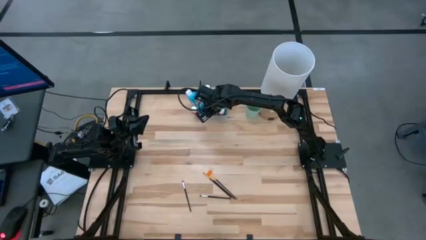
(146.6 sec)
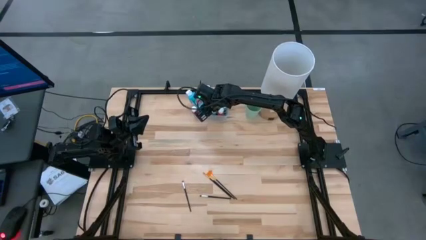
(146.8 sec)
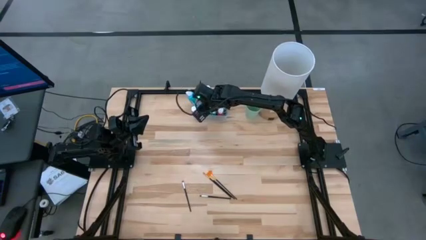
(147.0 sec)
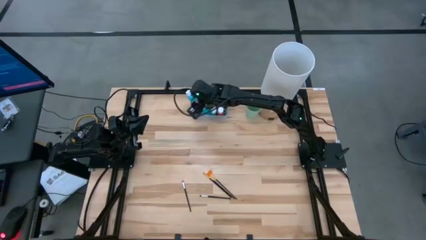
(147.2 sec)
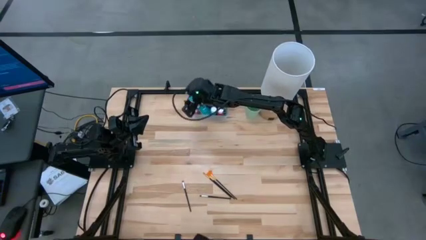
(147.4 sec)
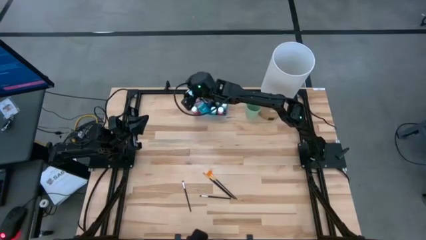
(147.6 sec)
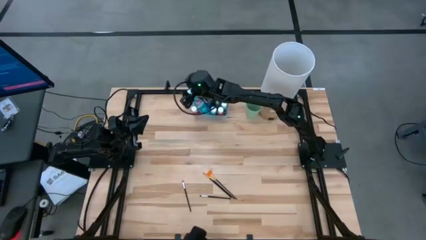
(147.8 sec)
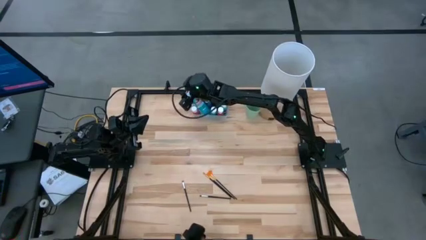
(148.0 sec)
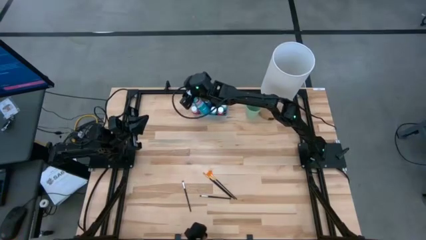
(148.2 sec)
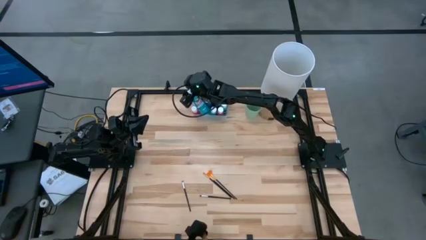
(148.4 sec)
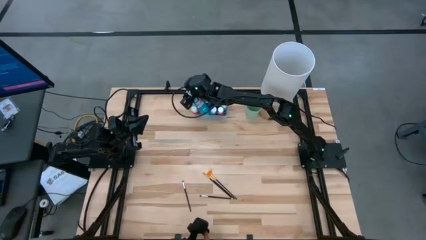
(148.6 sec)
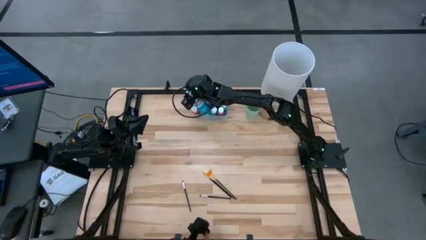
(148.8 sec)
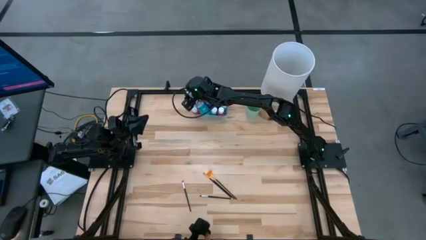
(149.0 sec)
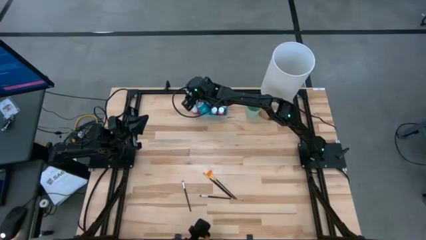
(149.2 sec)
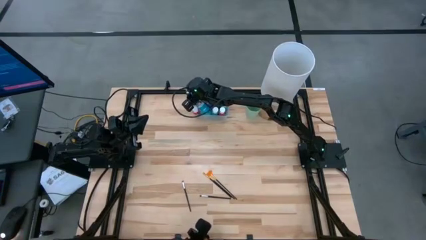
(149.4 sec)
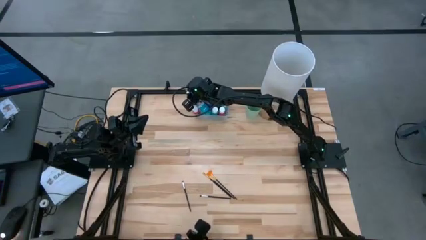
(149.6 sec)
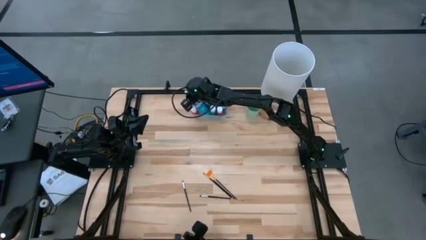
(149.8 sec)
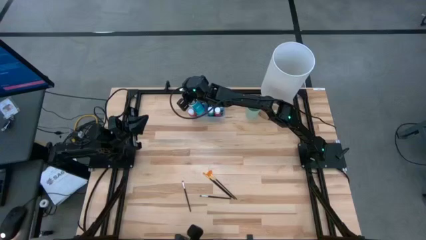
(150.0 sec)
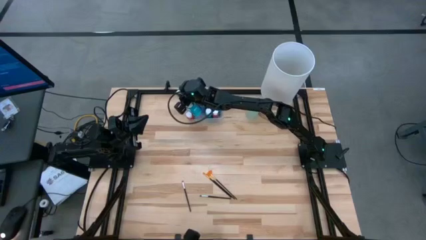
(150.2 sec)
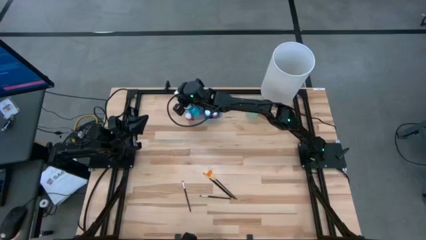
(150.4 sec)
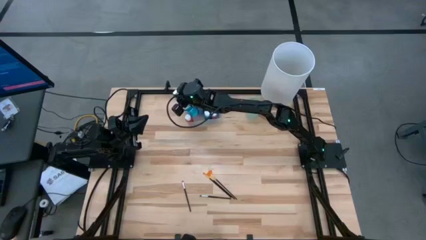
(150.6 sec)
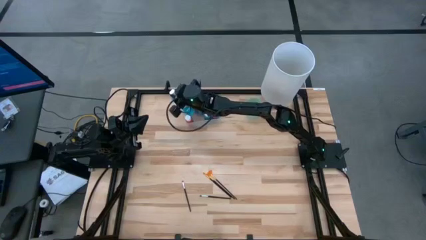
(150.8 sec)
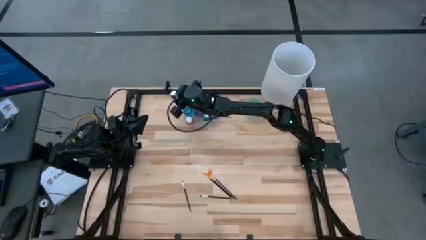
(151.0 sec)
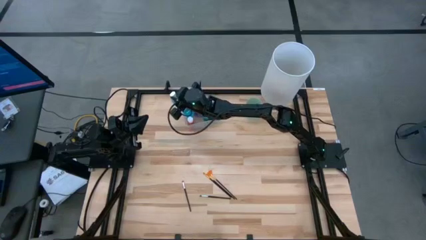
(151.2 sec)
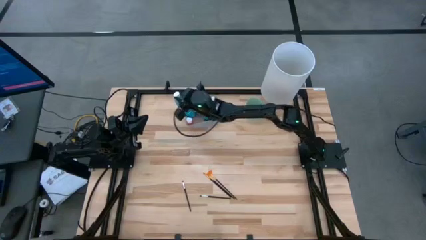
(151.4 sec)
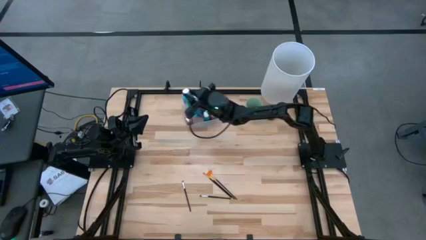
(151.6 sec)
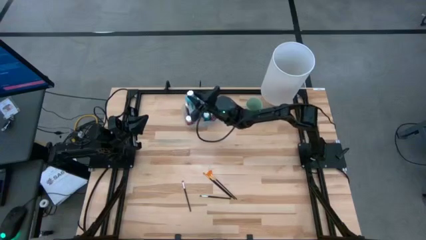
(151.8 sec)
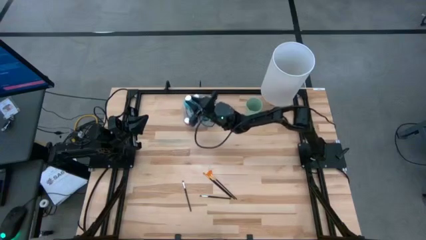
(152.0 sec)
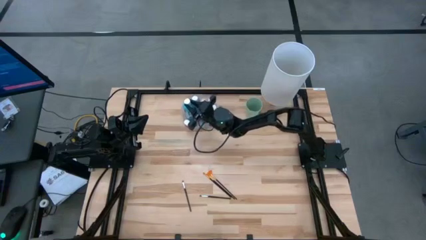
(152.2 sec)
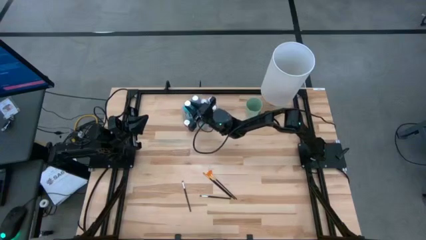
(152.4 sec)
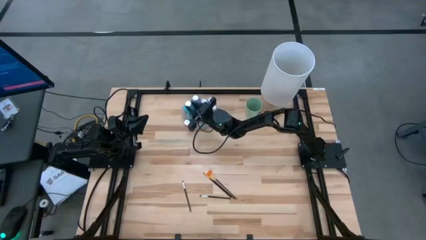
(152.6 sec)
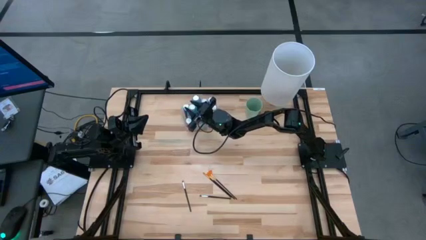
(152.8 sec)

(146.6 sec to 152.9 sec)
Task: Pick & Place Paint Supplies
Adjust the large light blue paint bottle inside the transparent bin

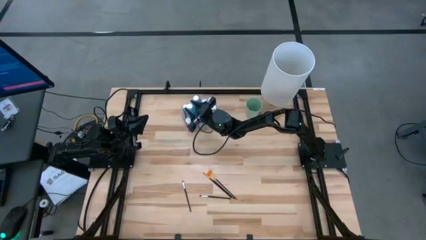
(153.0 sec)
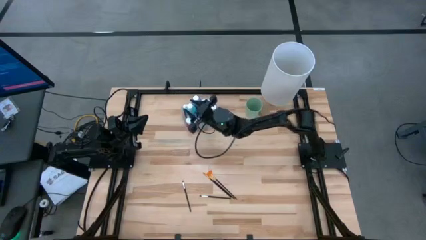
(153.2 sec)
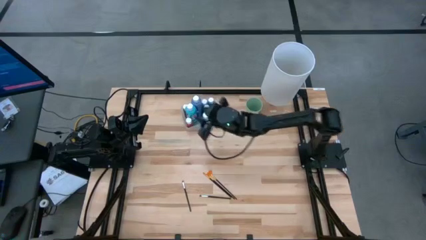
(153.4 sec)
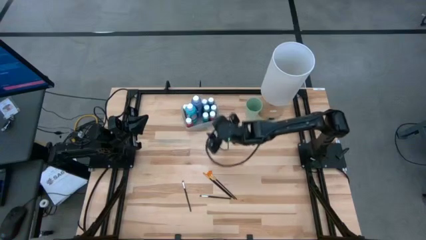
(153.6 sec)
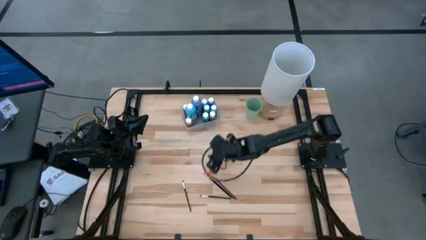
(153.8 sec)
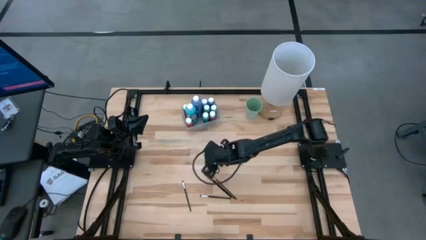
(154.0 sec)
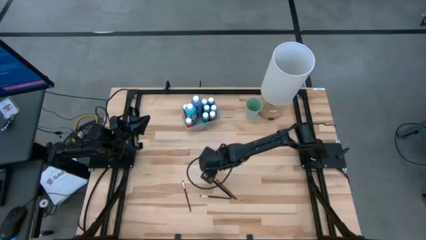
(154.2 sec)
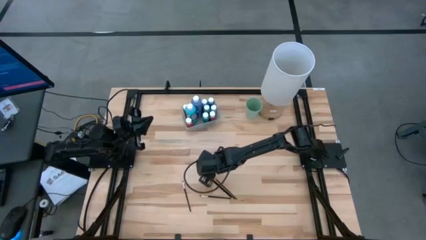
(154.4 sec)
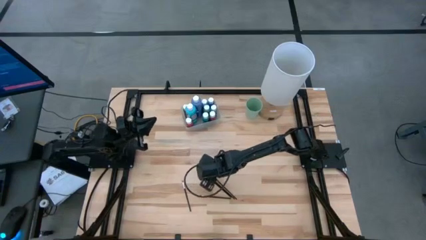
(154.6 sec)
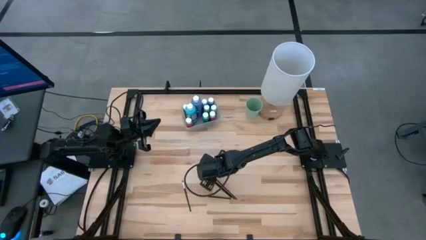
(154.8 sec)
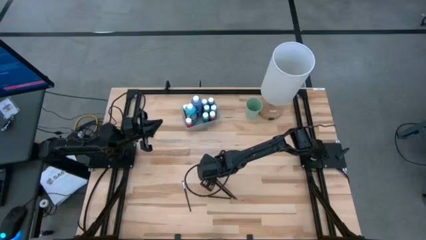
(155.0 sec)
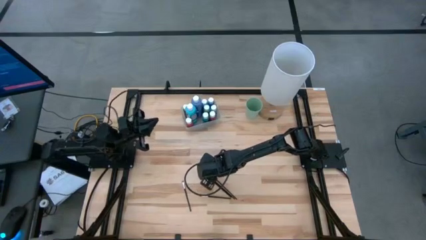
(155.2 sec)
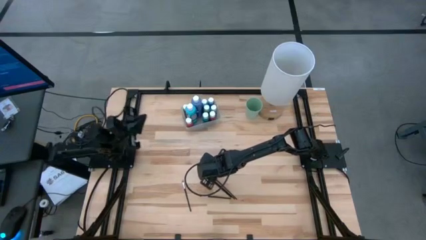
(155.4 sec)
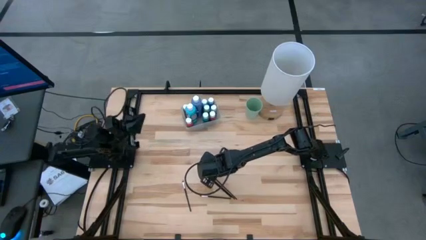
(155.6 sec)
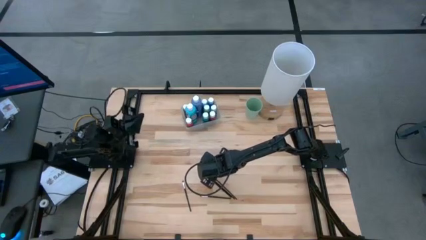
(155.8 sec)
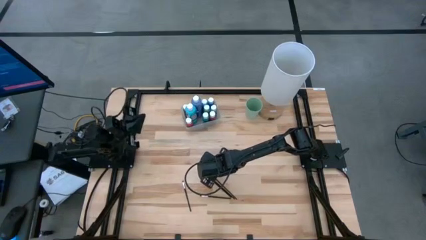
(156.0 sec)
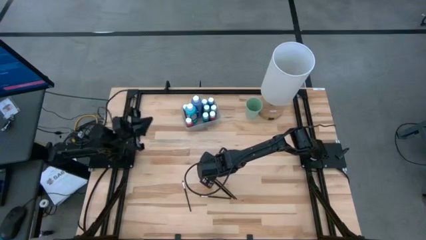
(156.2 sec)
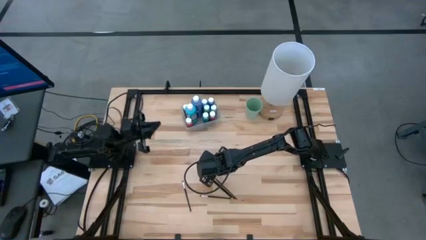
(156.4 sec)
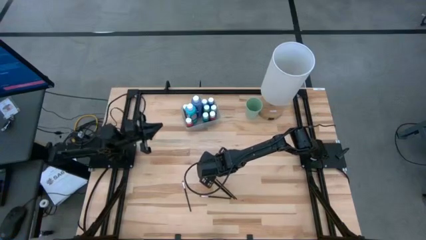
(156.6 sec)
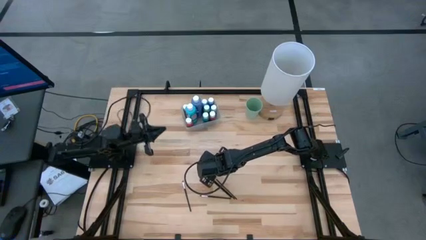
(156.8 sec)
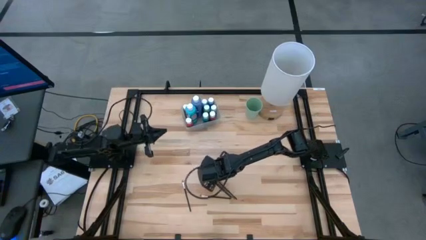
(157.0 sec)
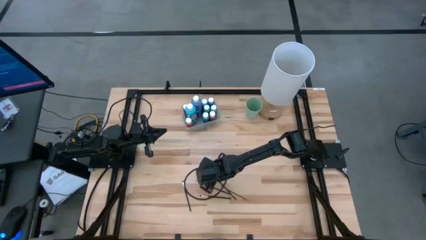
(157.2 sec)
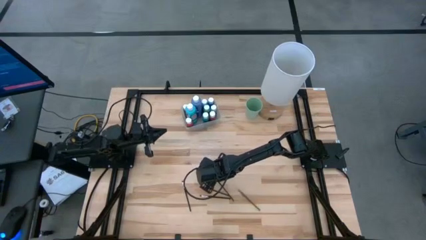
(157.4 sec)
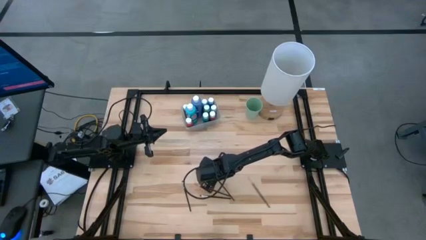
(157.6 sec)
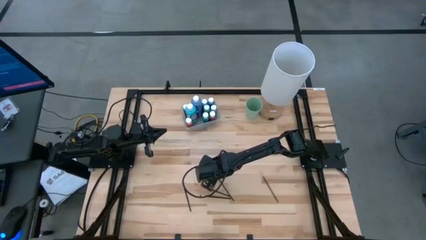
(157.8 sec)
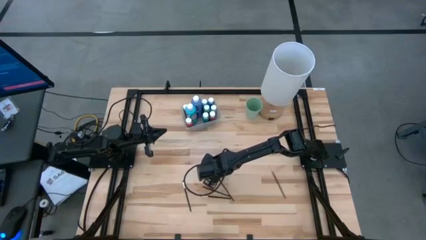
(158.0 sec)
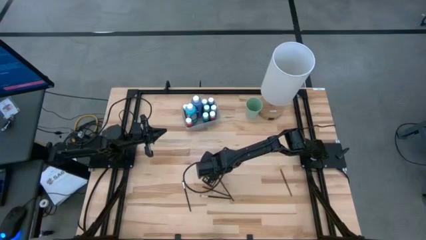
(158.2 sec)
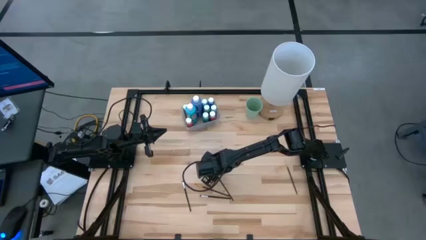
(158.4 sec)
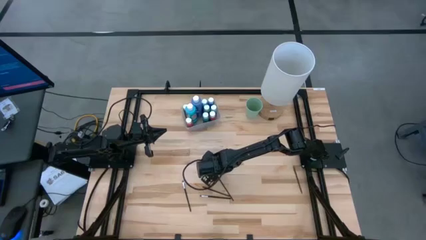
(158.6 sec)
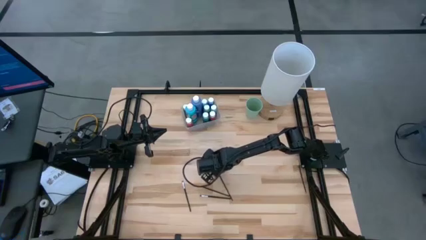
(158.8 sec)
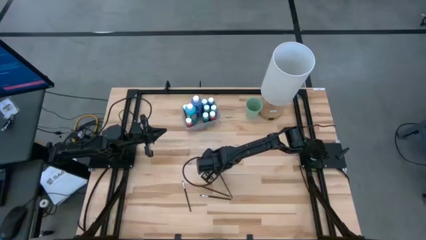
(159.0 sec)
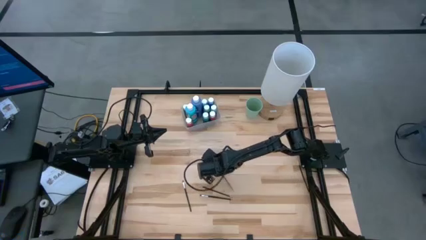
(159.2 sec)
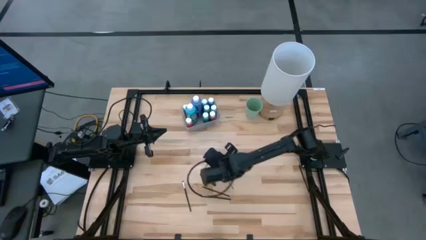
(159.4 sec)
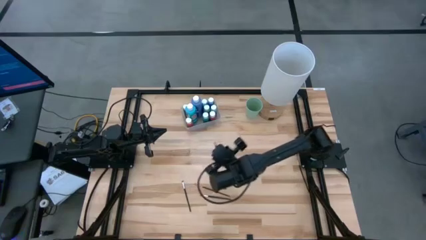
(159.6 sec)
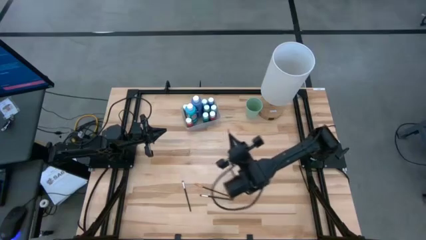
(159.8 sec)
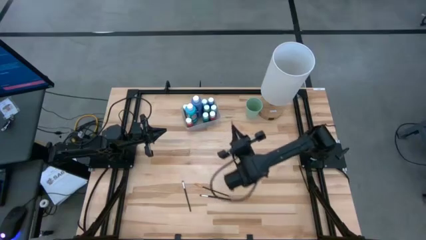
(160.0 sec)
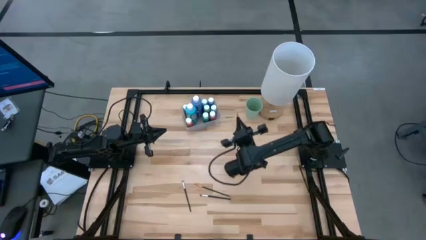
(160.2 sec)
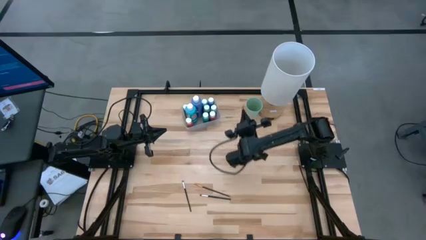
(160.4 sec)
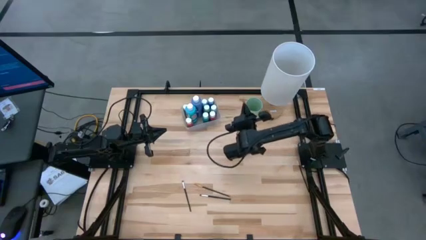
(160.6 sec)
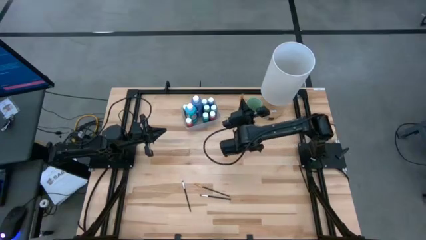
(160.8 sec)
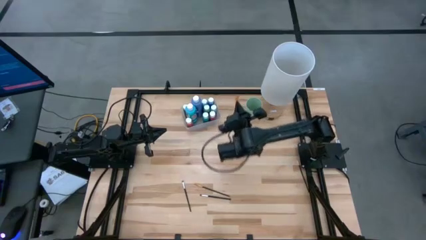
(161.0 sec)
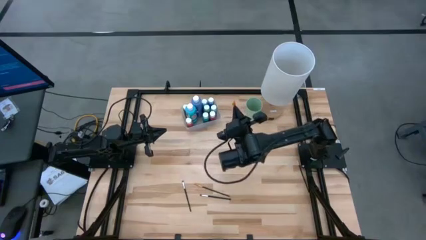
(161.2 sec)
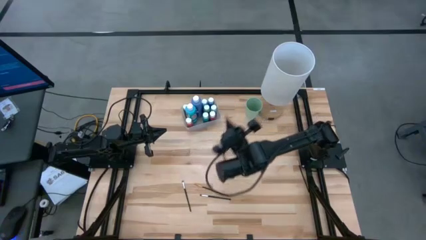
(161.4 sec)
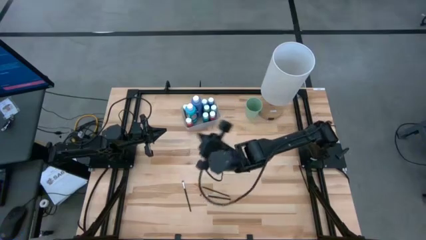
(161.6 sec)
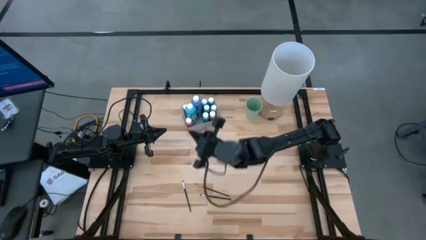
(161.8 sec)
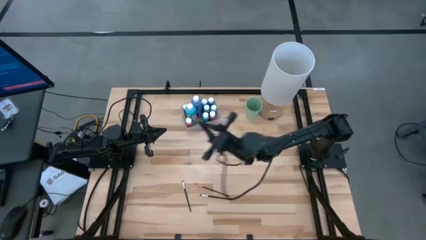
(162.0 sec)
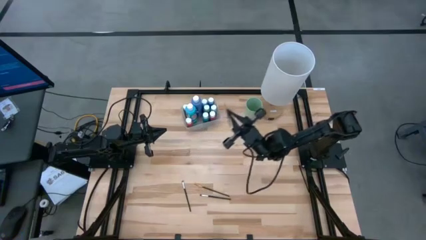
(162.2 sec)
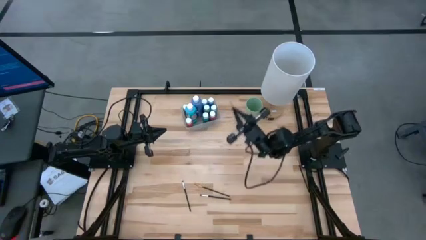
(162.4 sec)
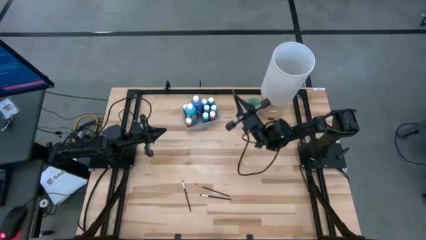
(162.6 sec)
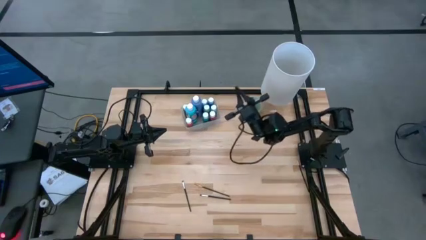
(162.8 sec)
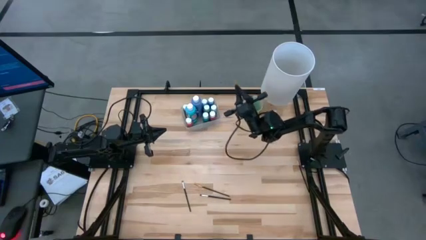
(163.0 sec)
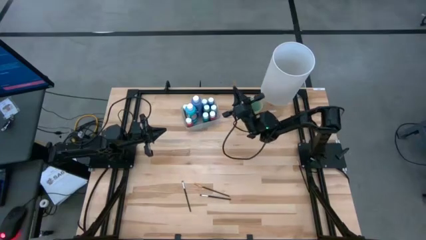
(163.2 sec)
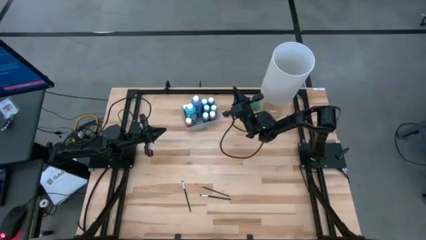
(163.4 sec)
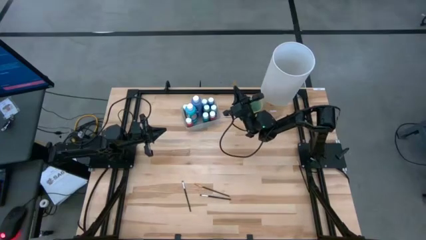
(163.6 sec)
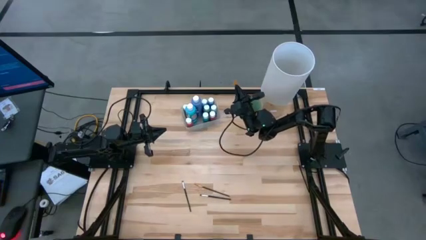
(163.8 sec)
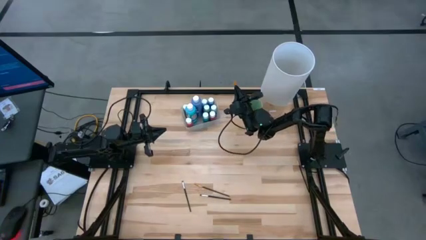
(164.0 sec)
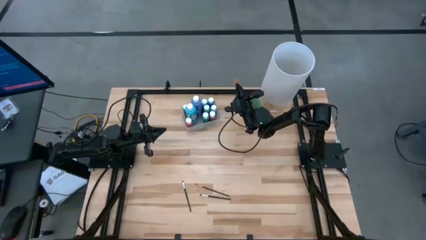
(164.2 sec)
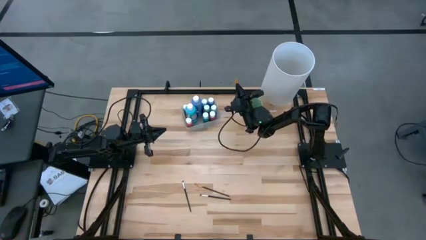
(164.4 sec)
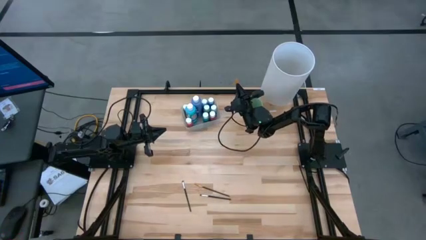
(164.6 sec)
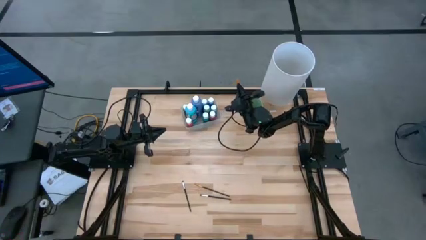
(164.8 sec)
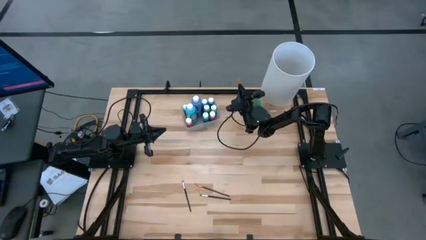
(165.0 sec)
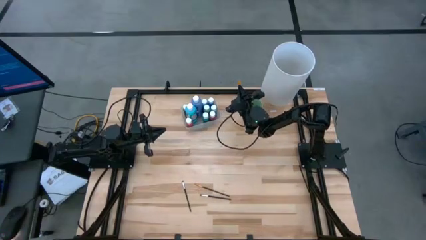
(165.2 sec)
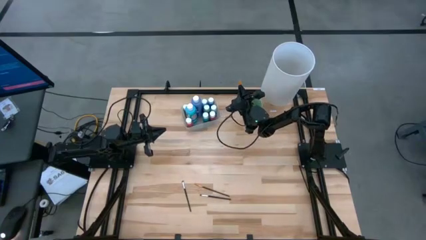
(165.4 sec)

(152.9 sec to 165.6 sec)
Put the gold paintbrush into the green cup
